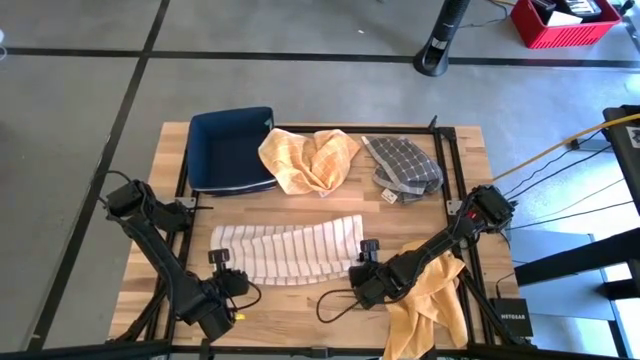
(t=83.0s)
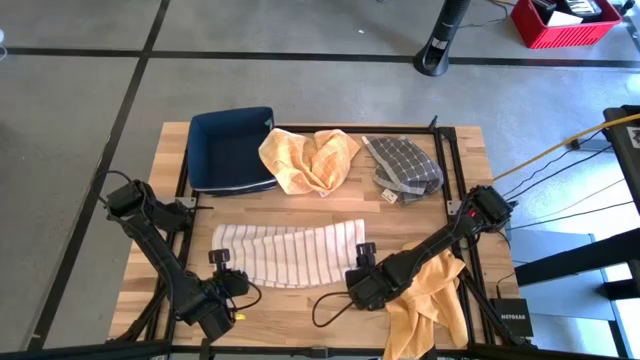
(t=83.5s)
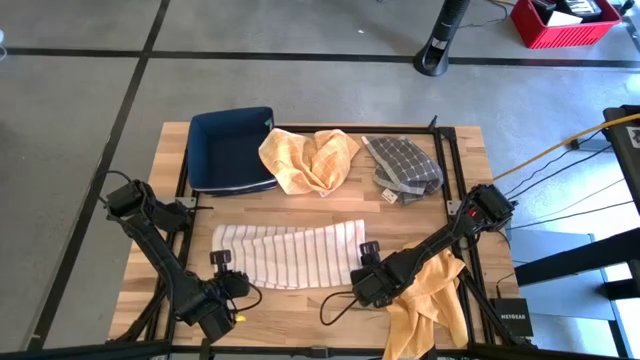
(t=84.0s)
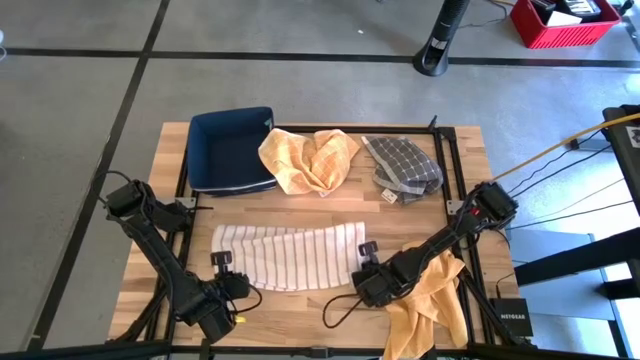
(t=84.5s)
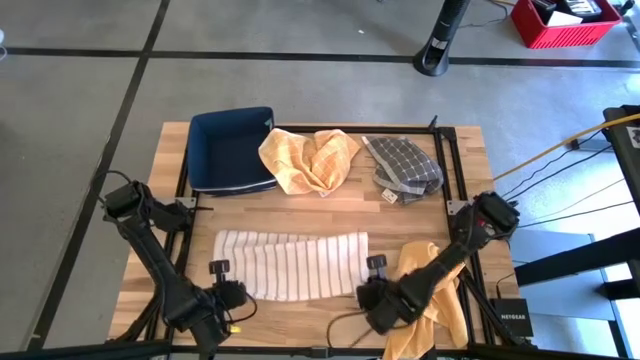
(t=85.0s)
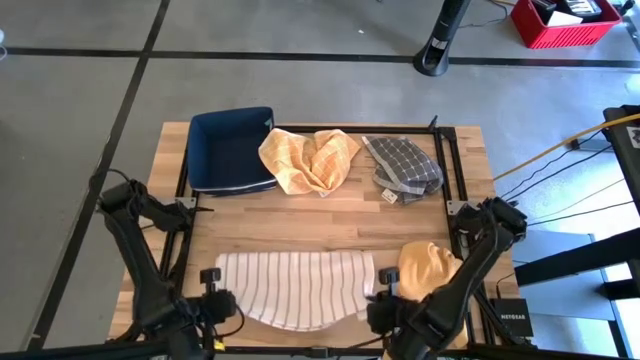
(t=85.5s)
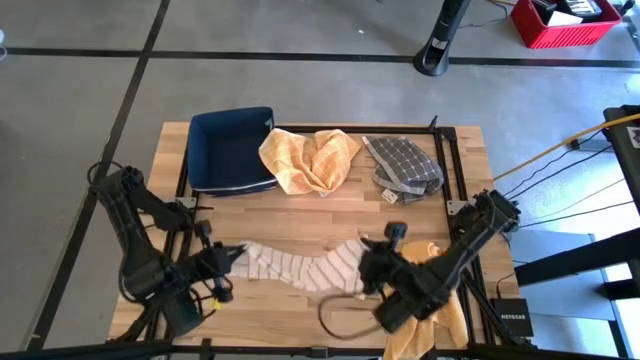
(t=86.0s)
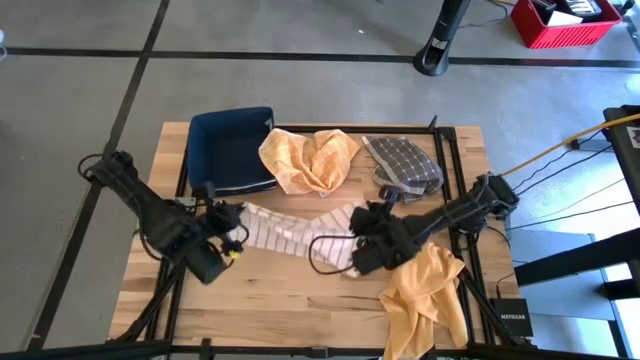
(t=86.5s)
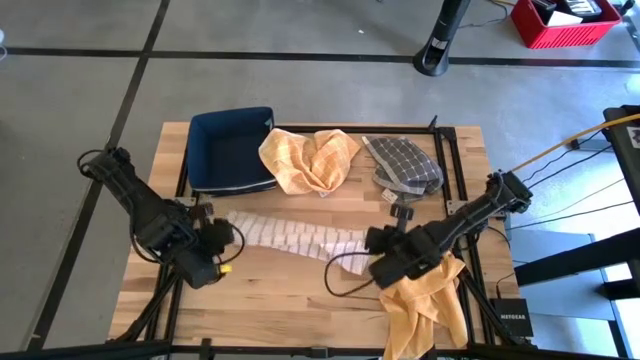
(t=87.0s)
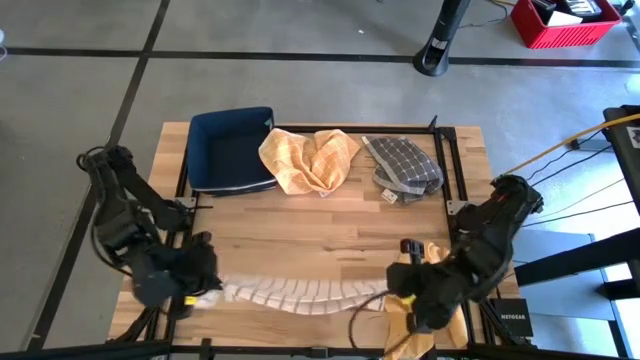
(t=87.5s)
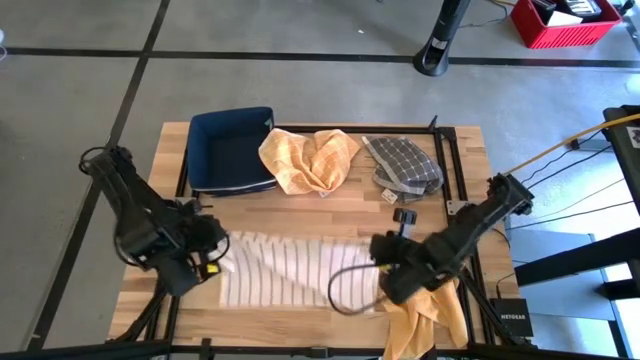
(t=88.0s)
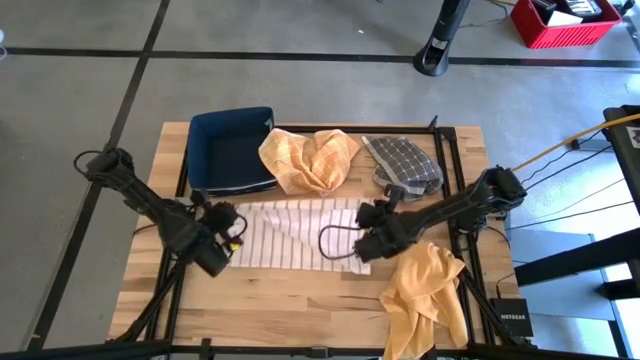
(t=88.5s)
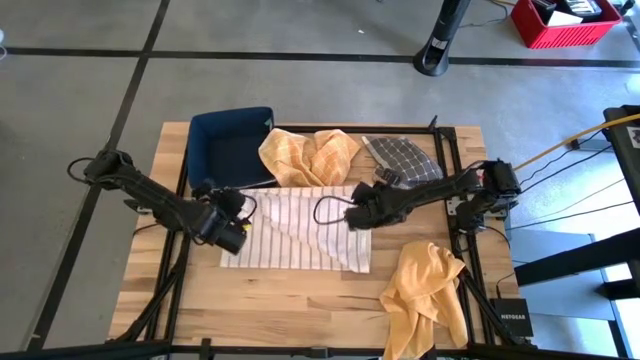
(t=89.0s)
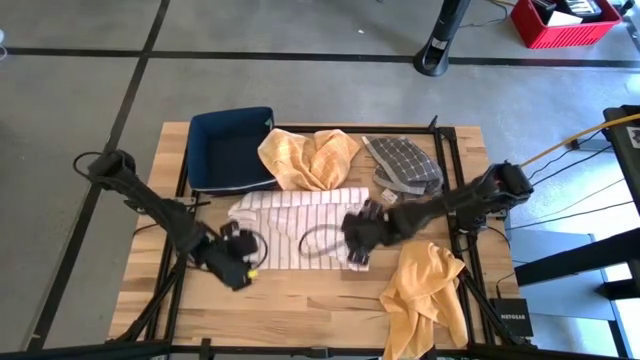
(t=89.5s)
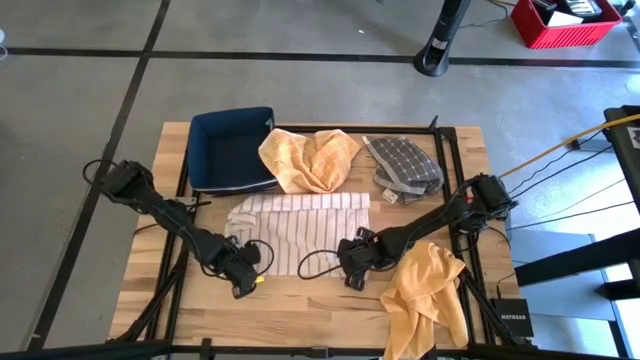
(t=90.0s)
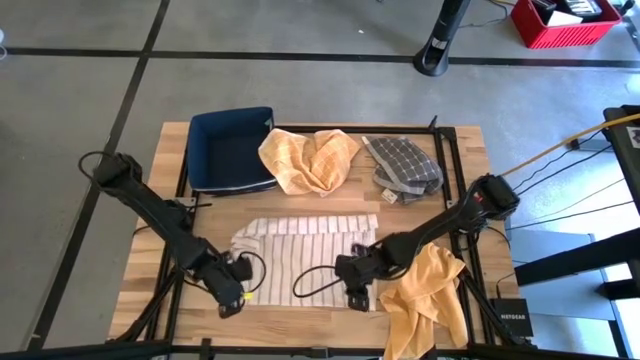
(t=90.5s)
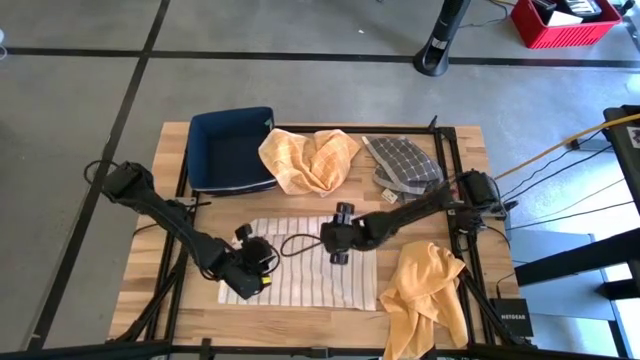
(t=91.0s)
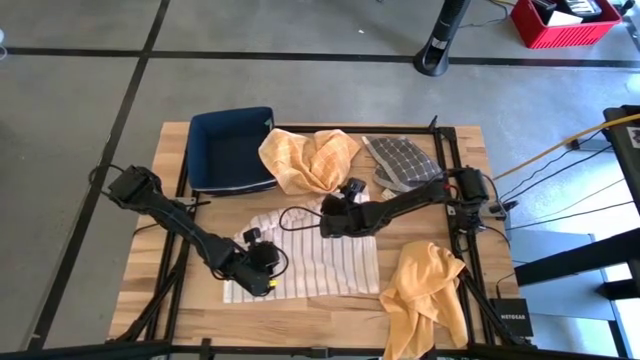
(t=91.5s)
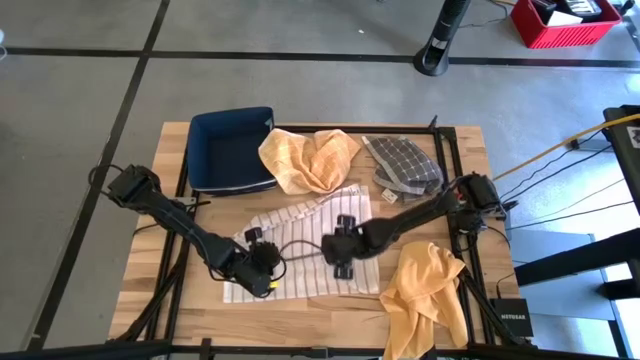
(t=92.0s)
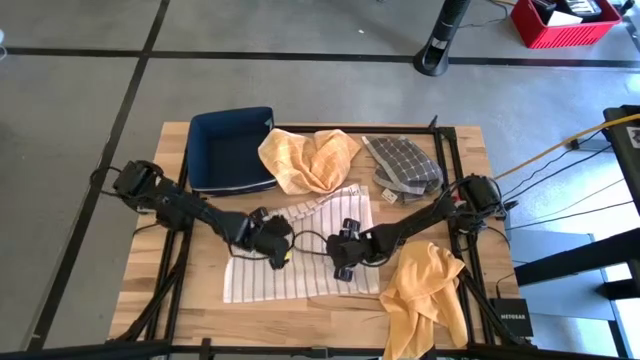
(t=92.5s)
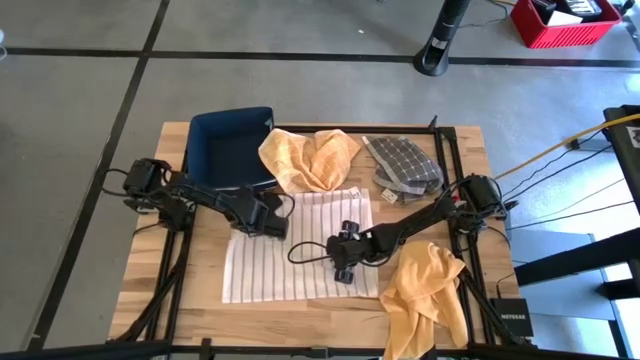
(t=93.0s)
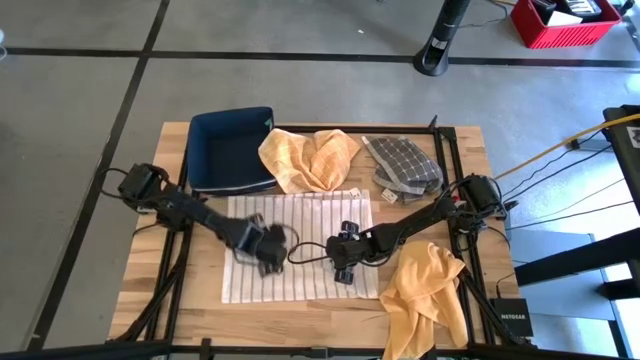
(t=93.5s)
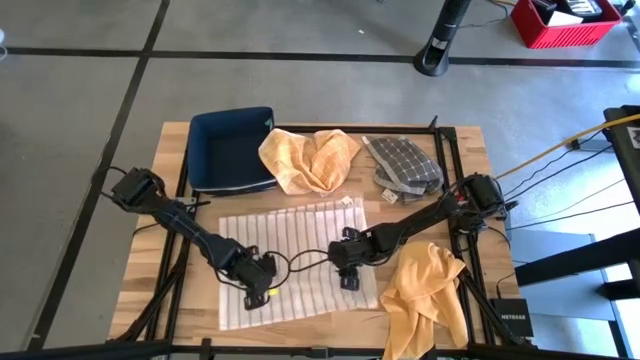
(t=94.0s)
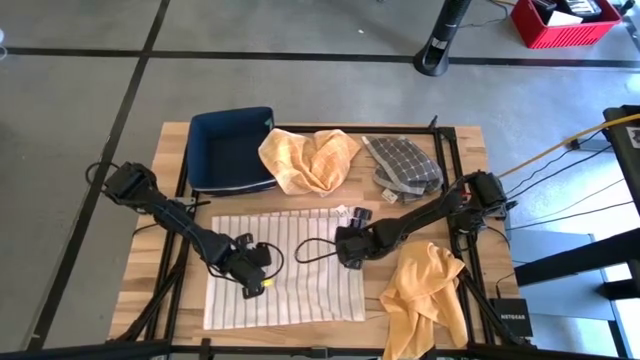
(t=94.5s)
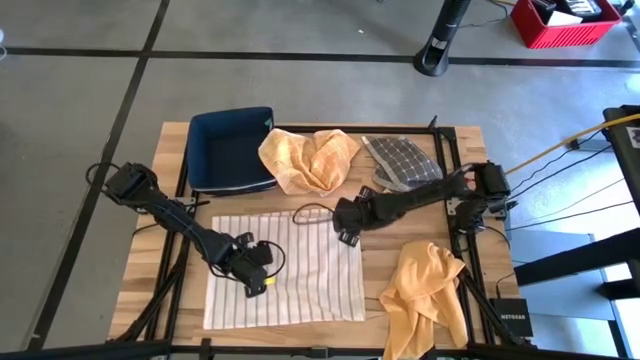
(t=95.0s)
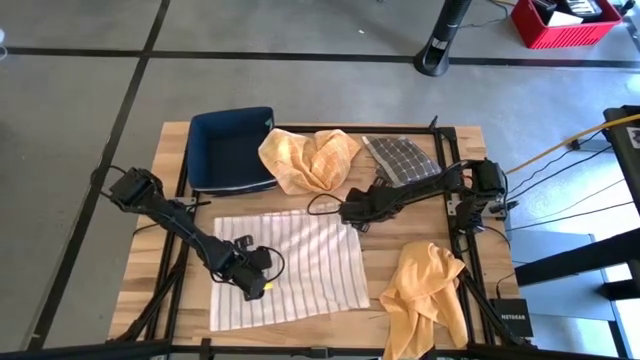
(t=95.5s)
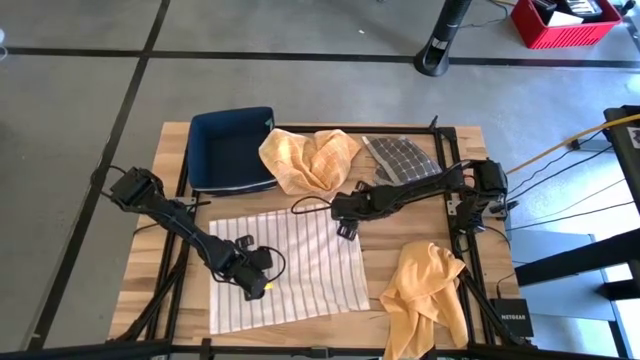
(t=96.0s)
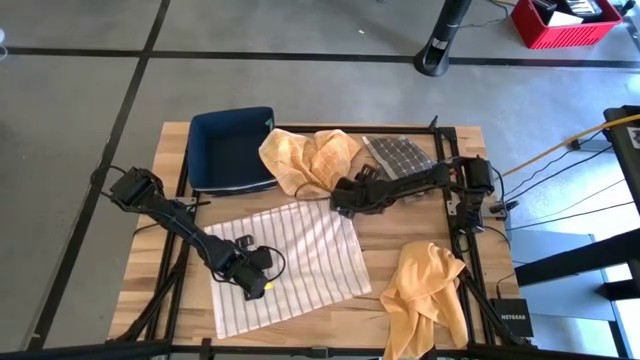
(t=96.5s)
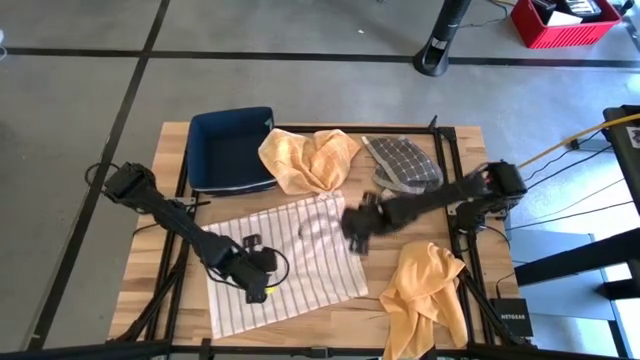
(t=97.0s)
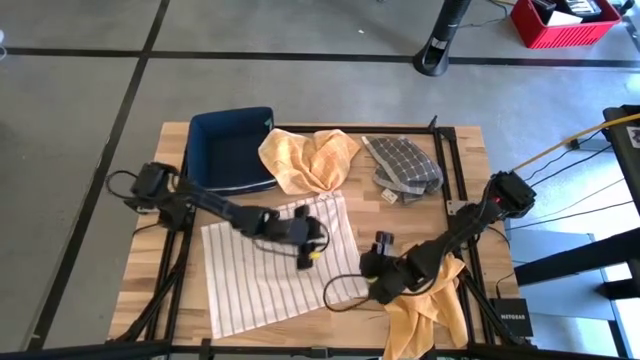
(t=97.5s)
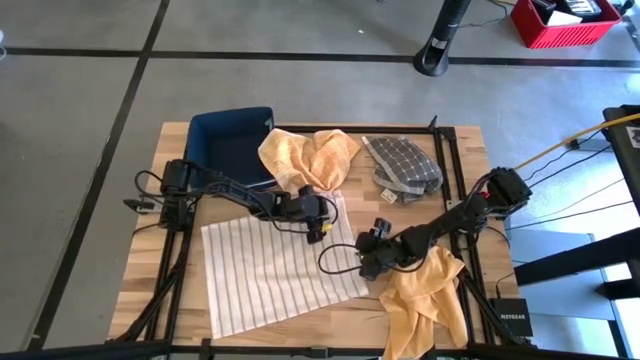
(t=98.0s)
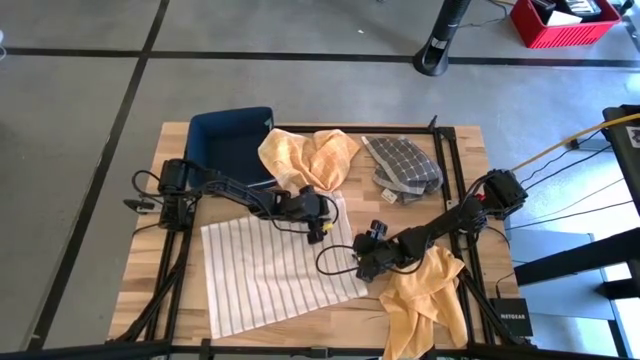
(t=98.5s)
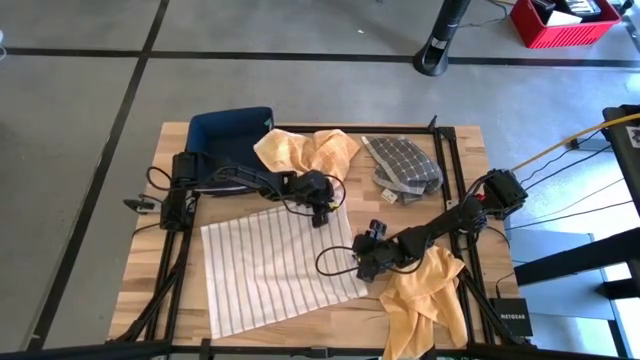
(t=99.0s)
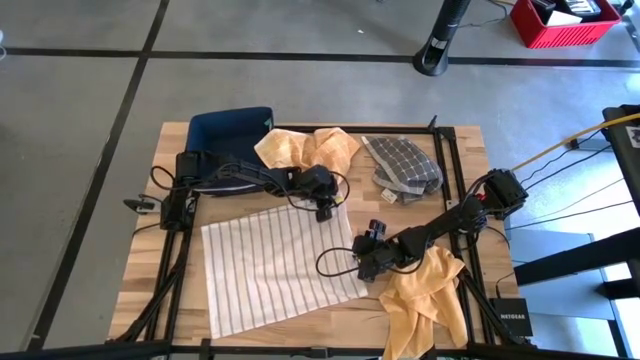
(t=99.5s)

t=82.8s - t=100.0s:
Task: Fold towel
Fold the white towel

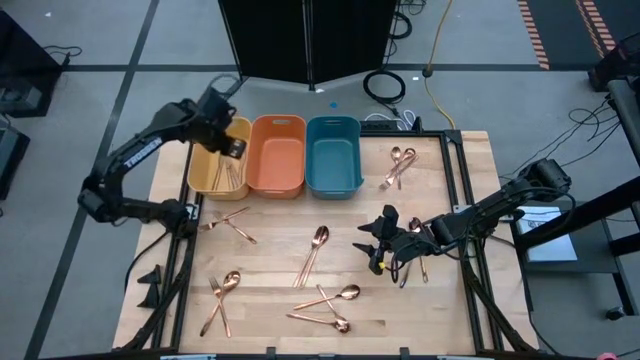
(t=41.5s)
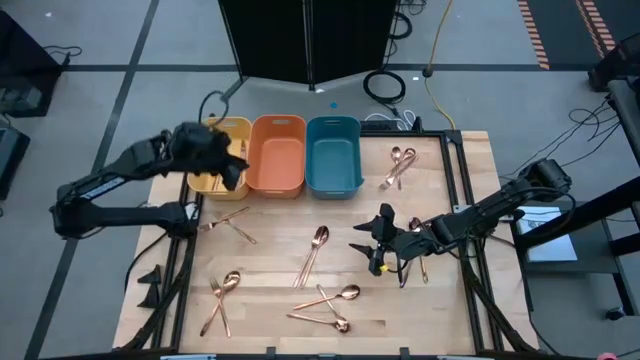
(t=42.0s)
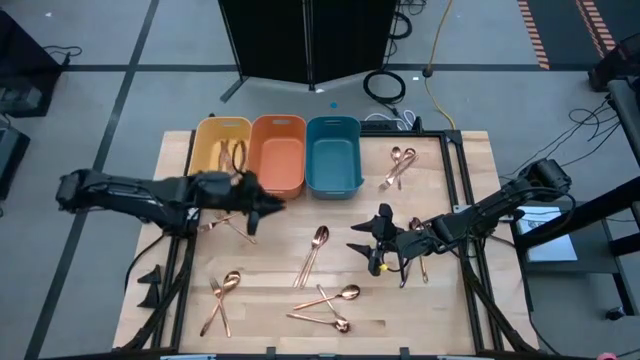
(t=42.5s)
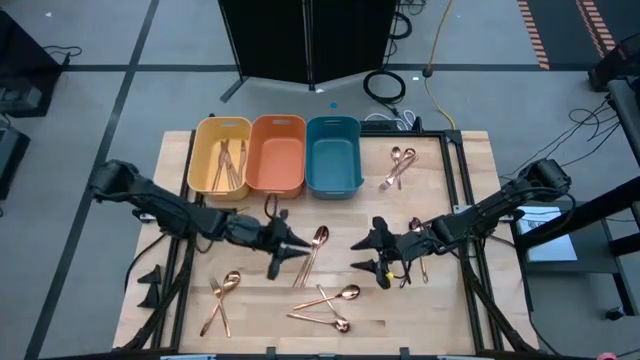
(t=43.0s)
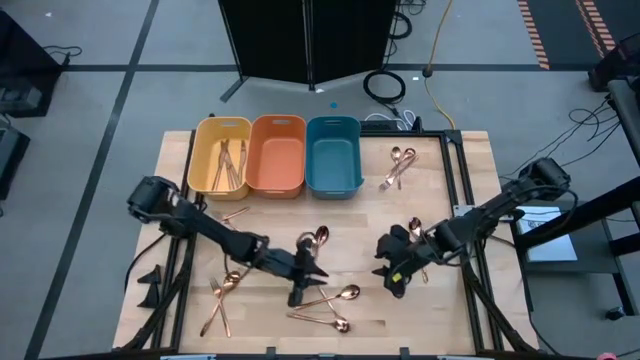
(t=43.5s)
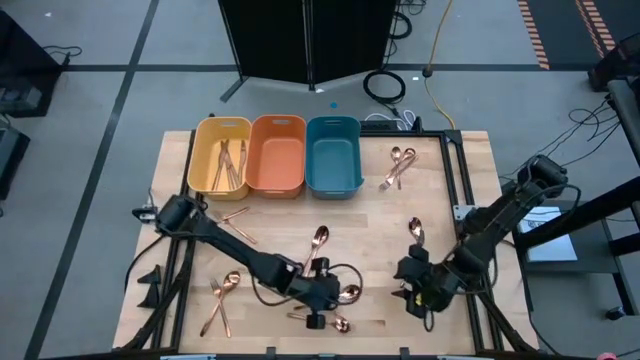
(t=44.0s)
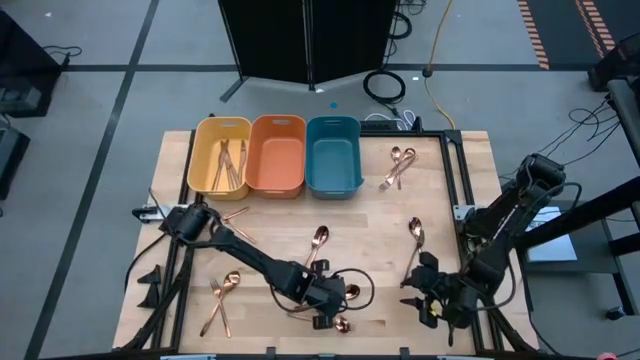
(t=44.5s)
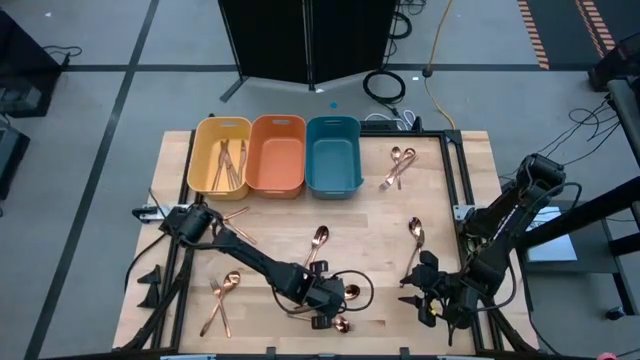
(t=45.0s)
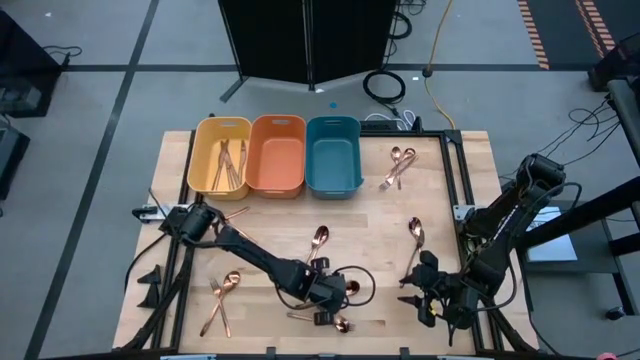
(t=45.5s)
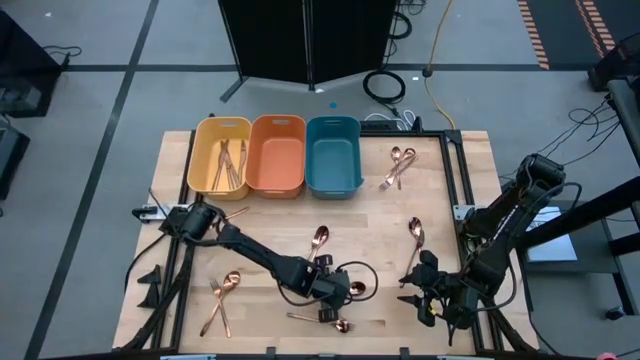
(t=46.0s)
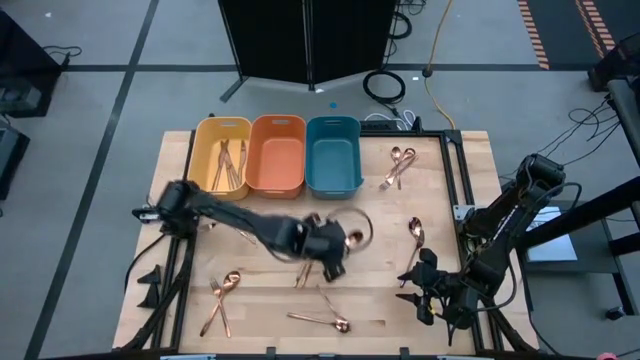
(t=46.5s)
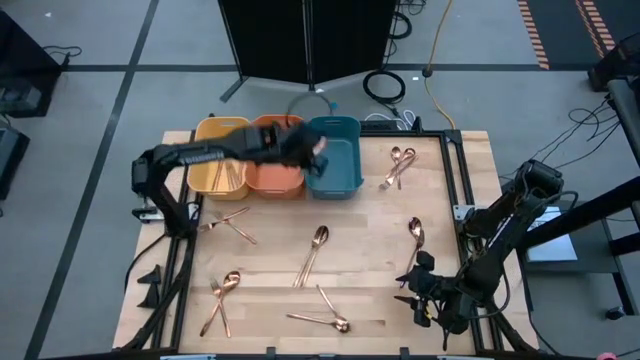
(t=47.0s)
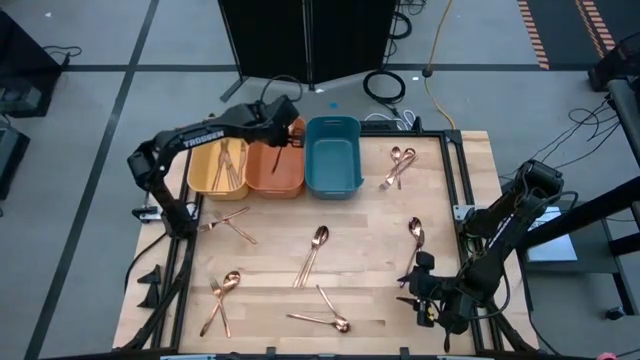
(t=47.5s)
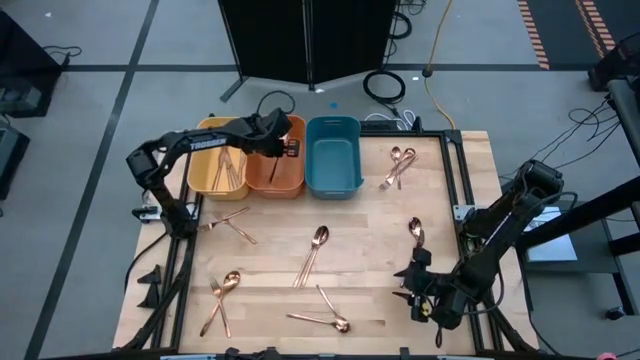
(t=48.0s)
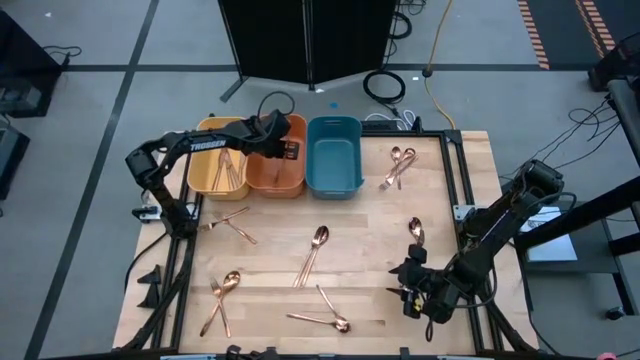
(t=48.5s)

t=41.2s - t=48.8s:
Task: Sort silverware
Put the gold spoon into the orange bin
